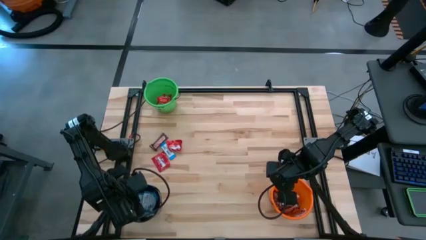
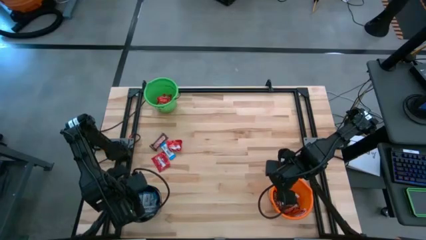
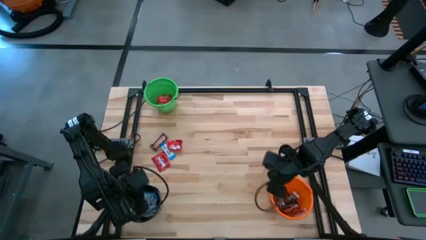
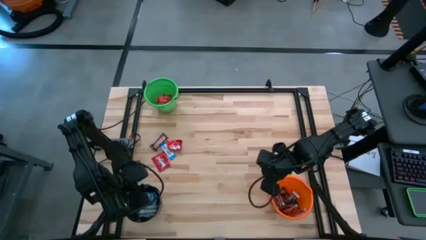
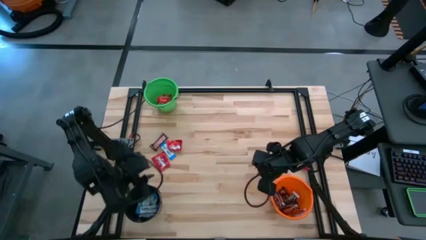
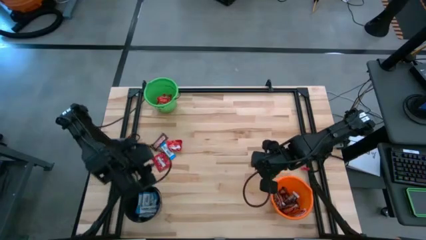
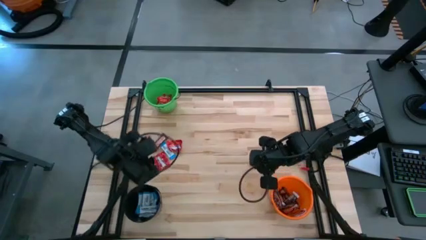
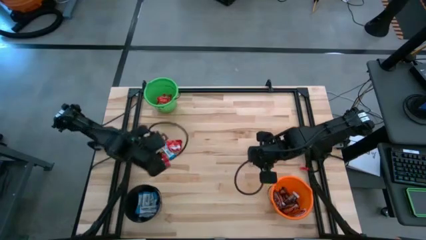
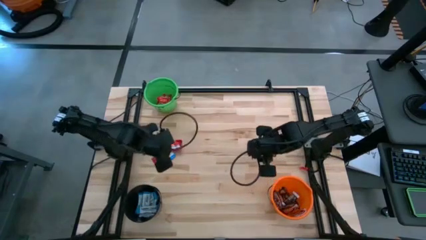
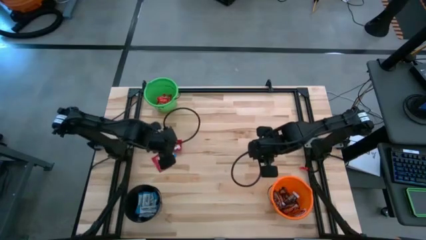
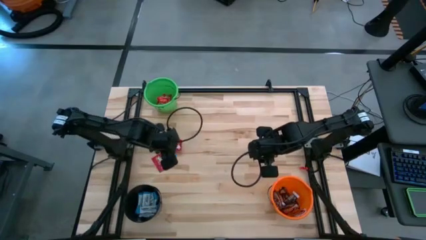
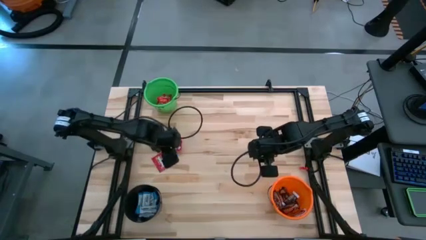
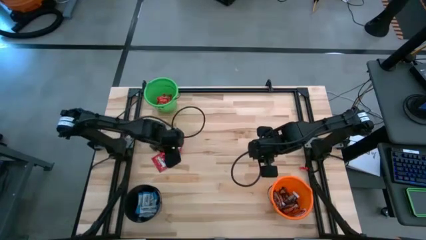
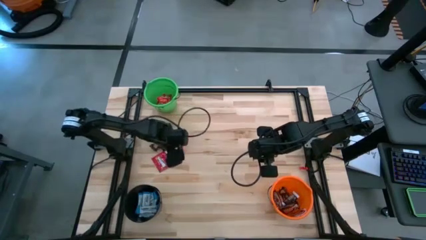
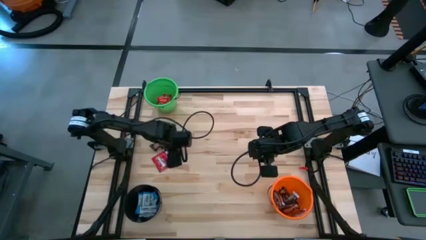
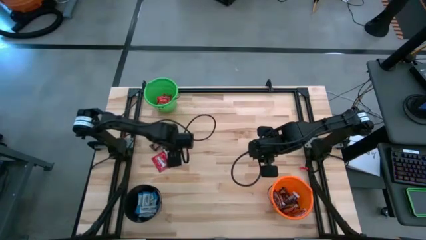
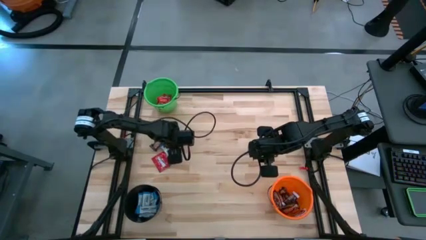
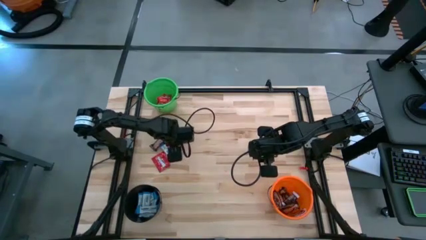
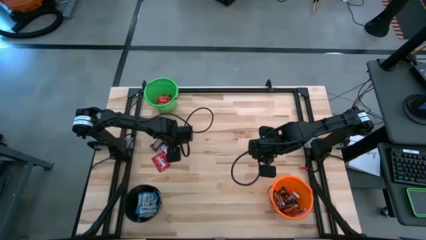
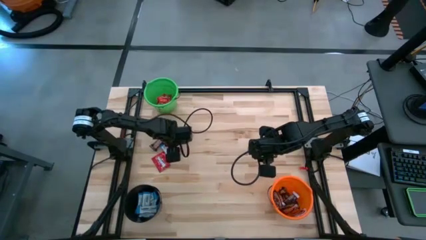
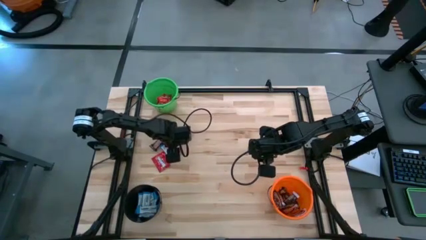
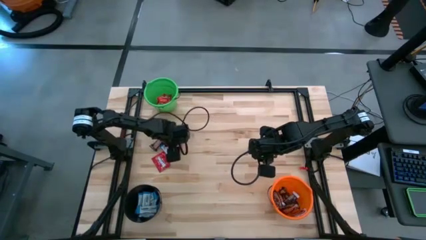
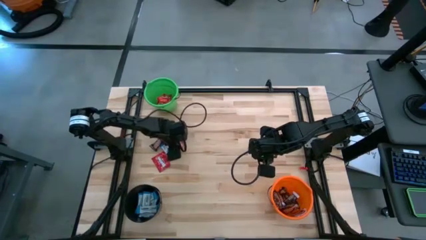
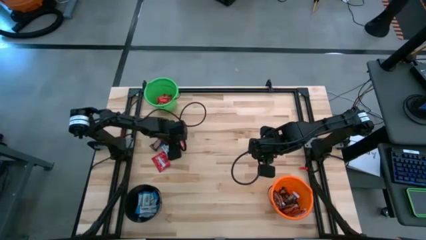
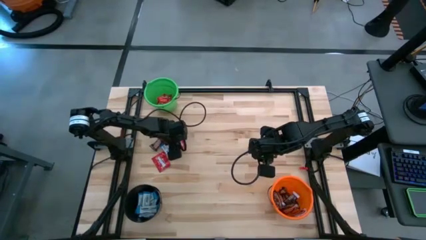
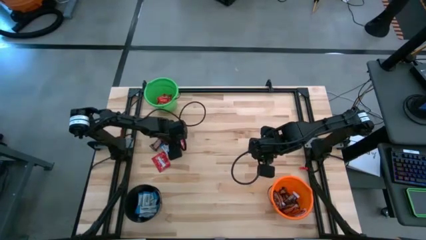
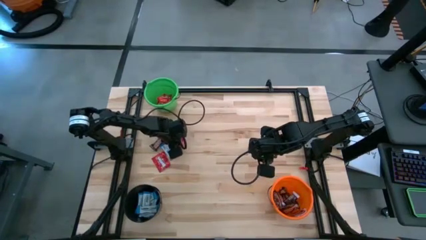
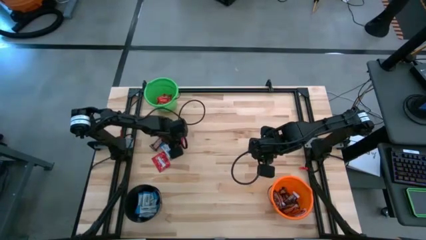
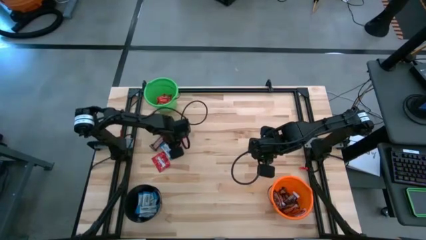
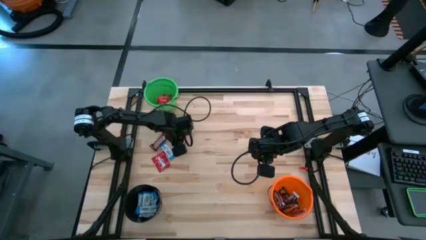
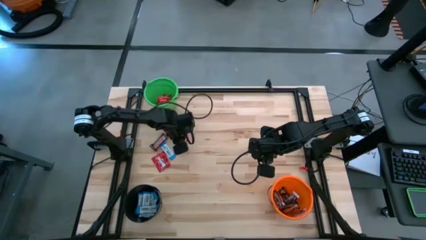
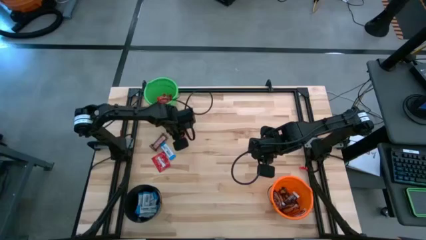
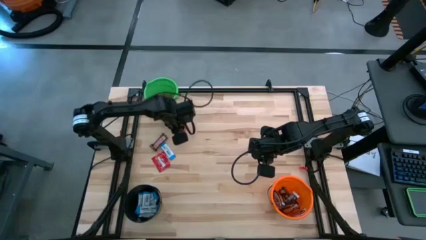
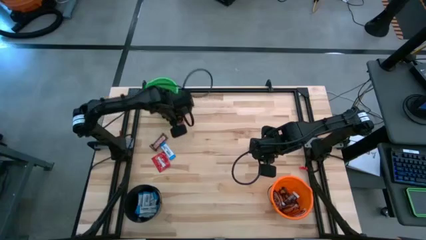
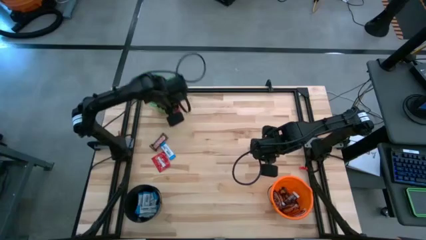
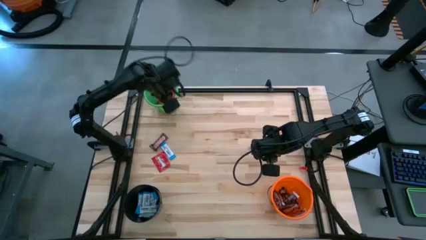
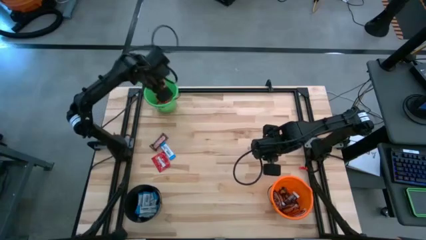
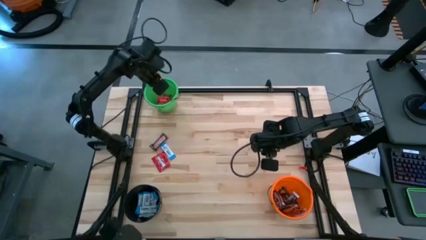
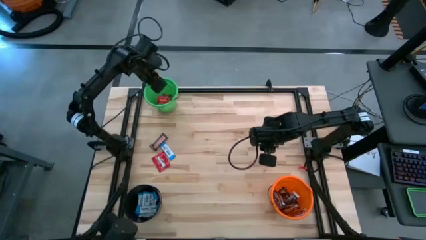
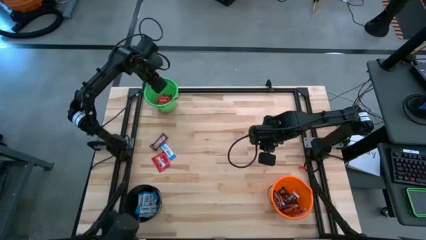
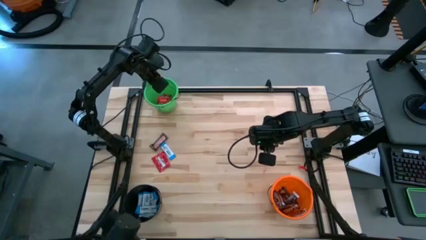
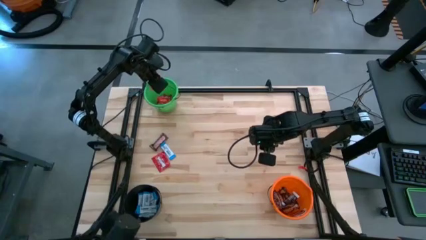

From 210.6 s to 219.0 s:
Task: Sort candy
Put the red candy into the green bucket

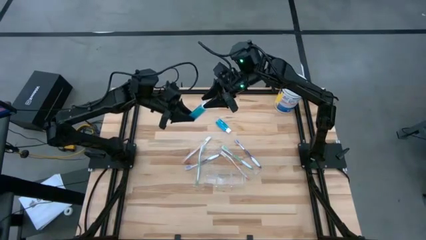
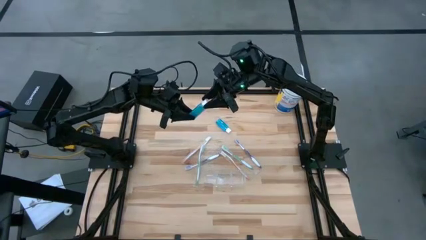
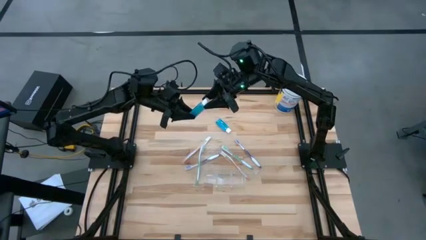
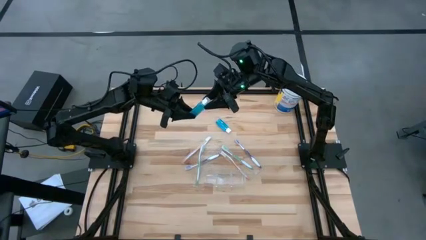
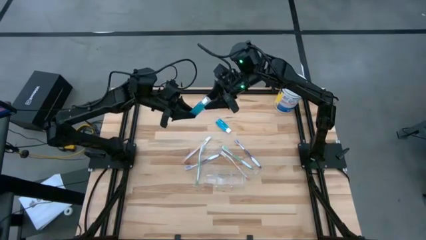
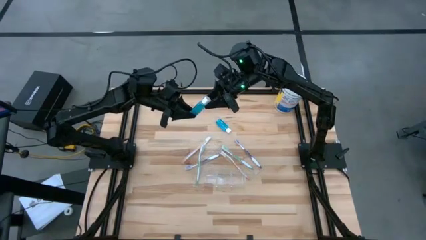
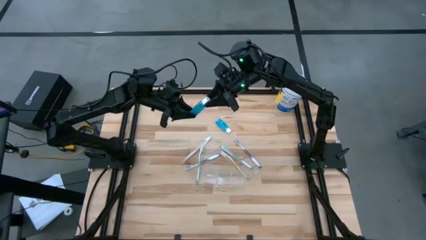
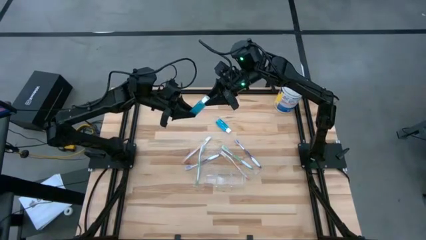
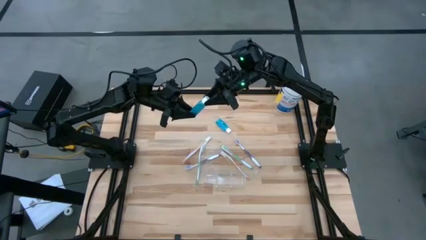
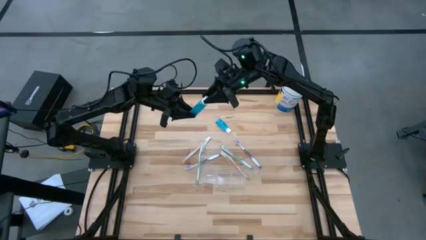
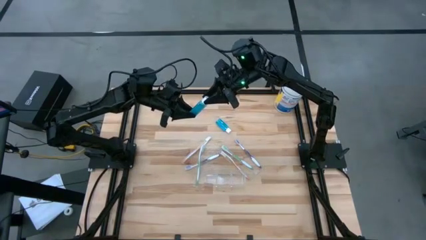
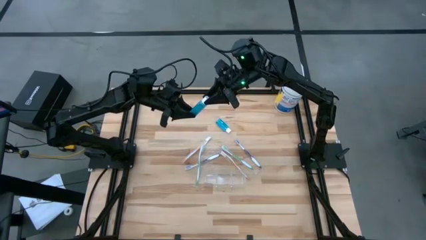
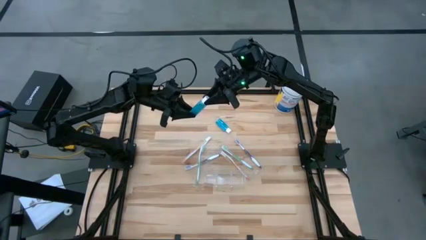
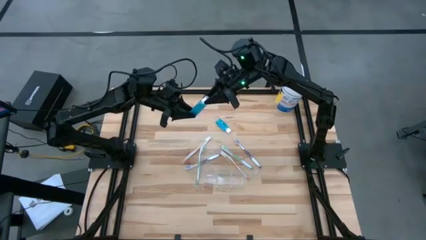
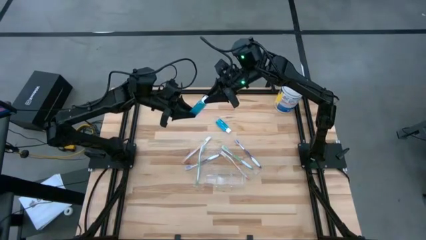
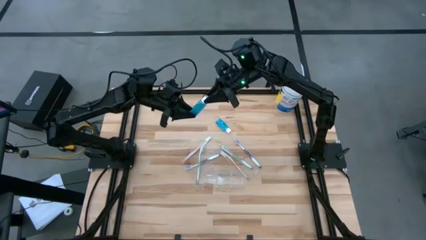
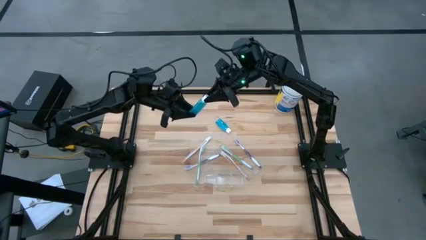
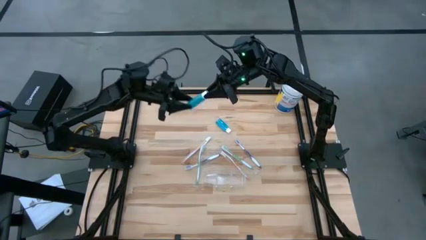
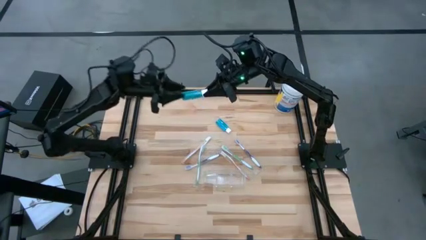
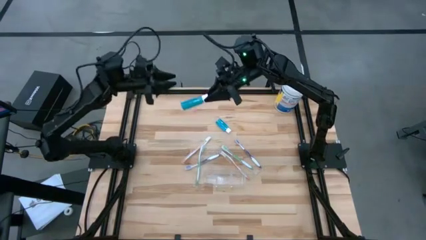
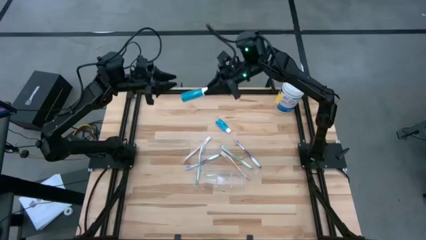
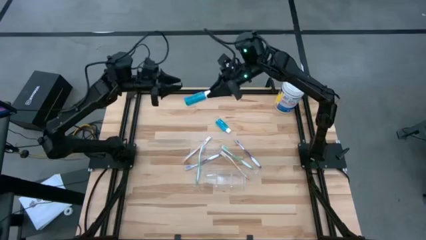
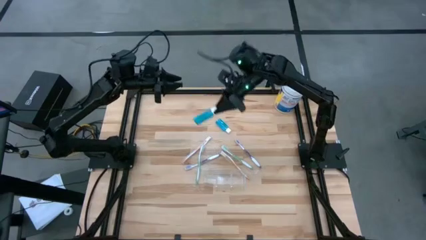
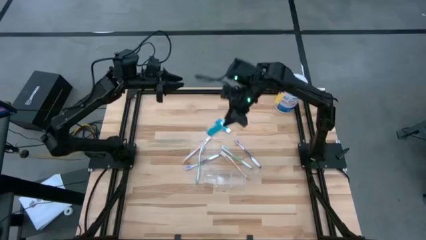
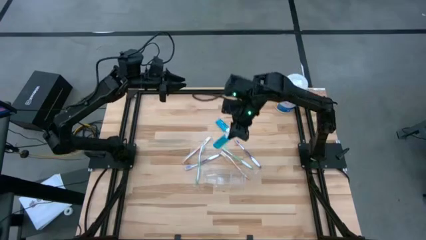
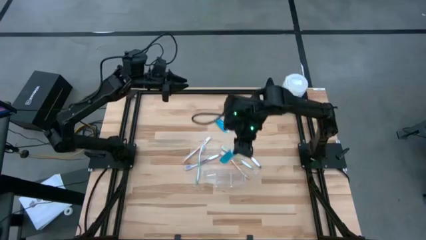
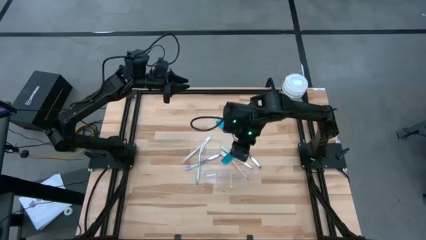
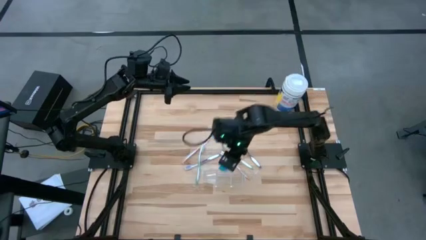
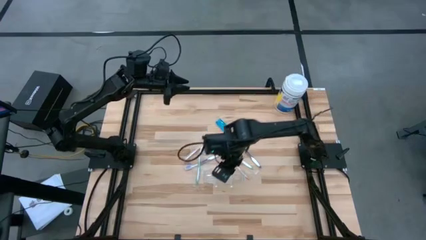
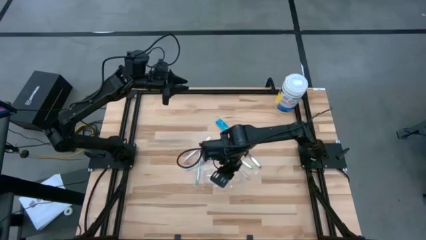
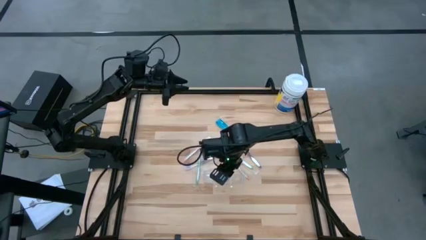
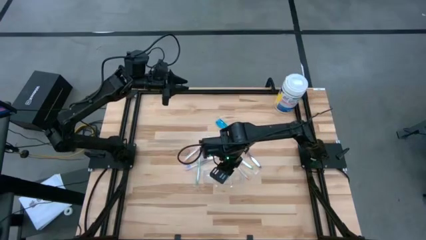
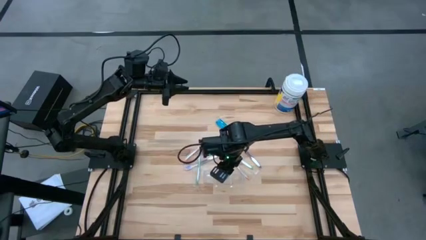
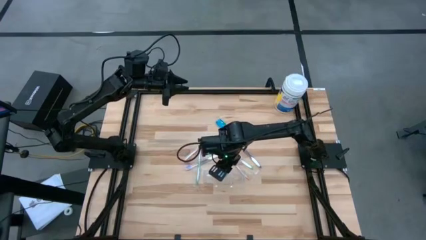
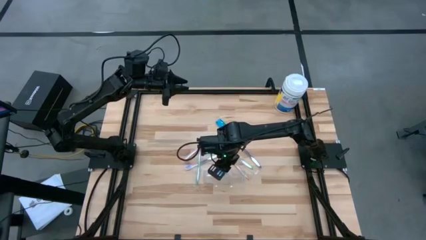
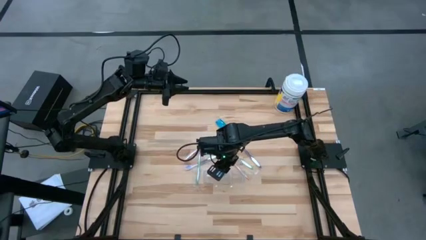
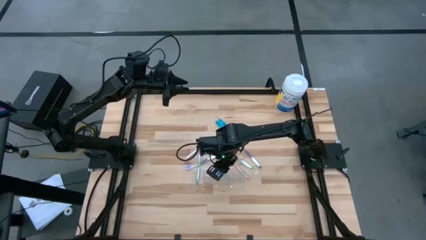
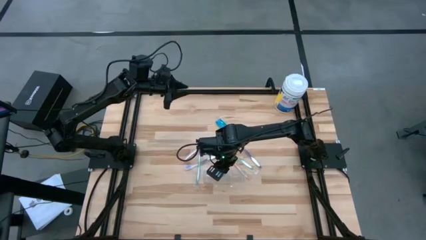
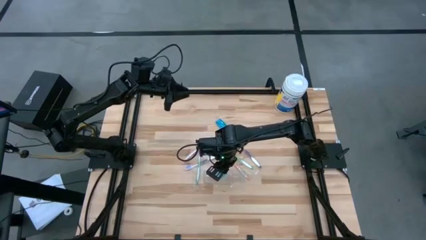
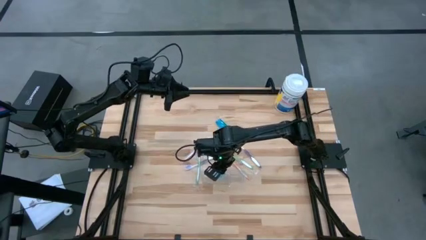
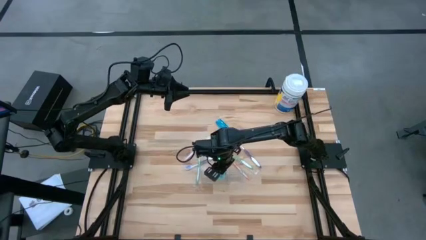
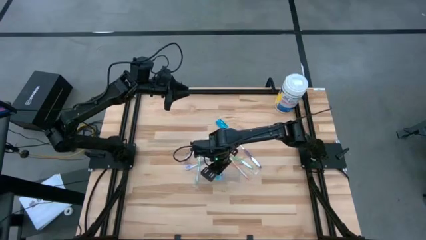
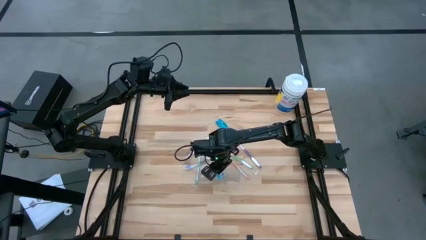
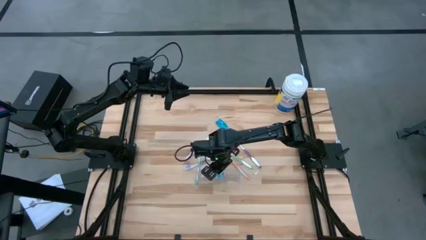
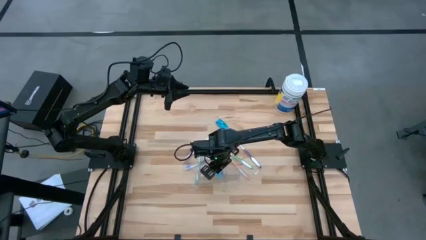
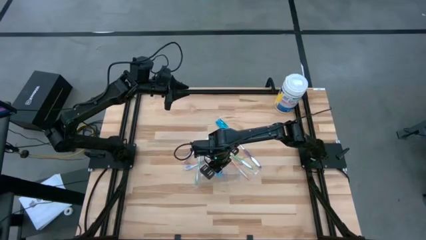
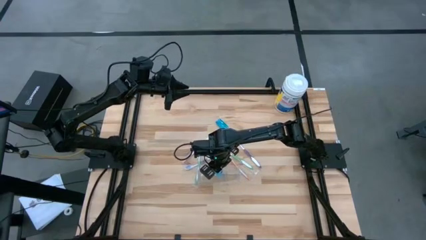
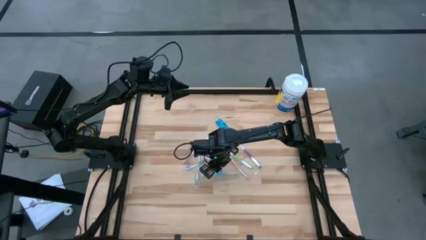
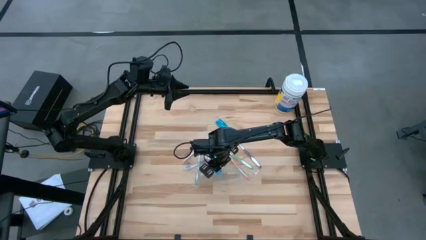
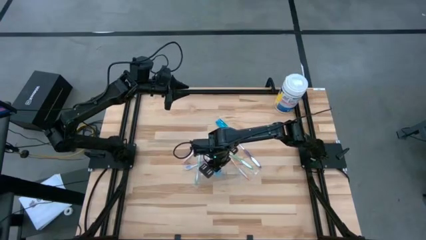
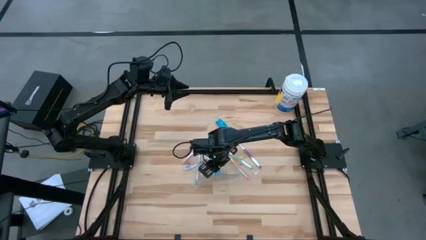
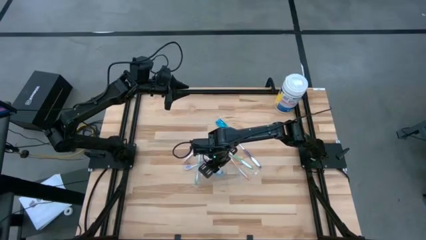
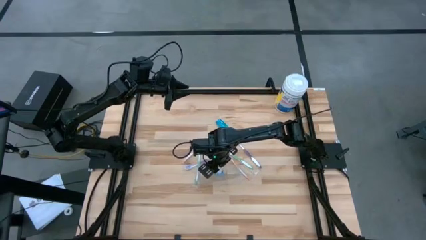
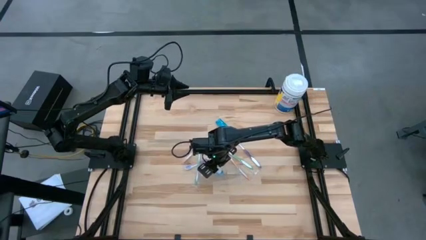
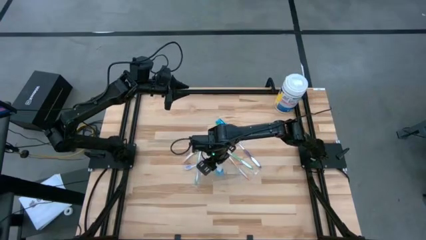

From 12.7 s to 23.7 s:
Task: Pick & Place toothbrushing station
Put the blue mouthwash into the transparent organizer
